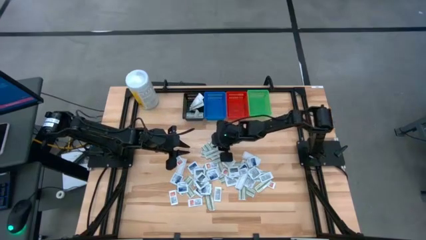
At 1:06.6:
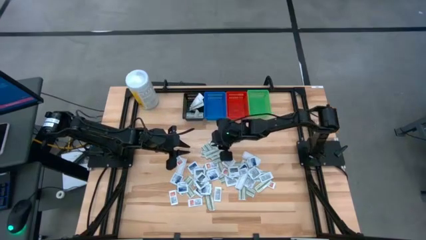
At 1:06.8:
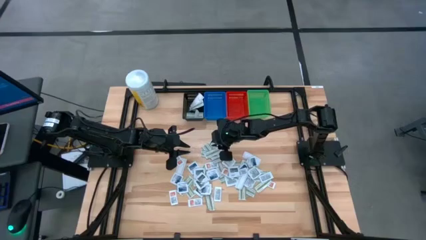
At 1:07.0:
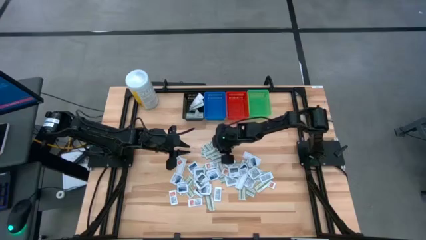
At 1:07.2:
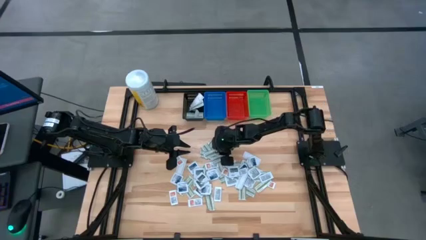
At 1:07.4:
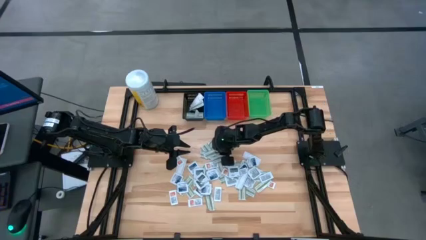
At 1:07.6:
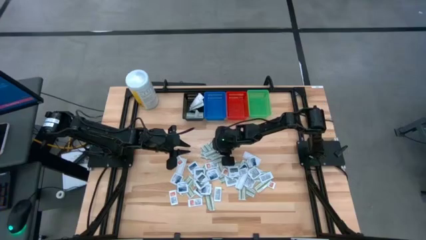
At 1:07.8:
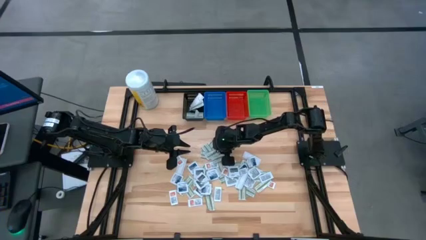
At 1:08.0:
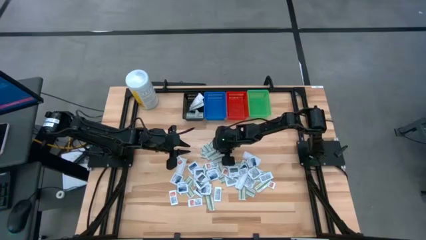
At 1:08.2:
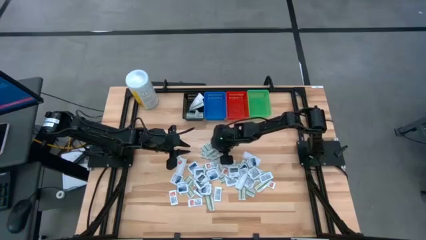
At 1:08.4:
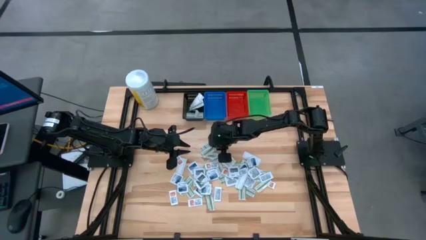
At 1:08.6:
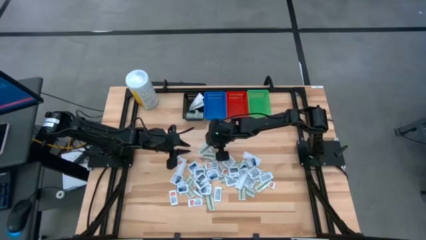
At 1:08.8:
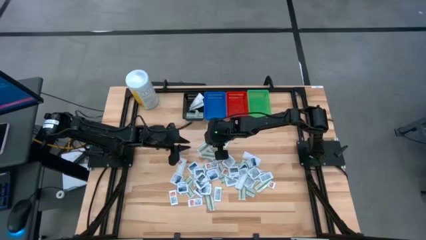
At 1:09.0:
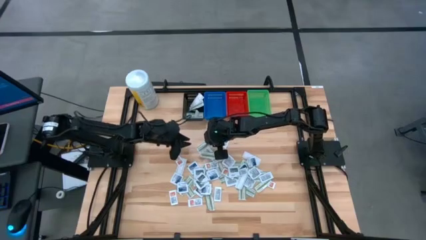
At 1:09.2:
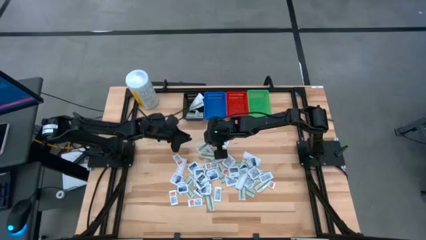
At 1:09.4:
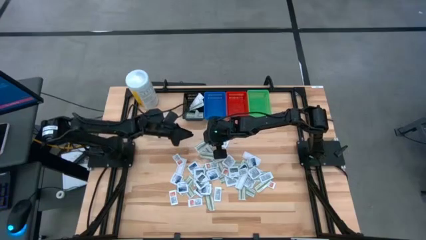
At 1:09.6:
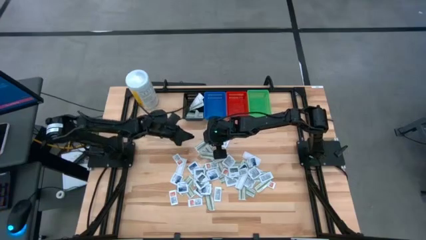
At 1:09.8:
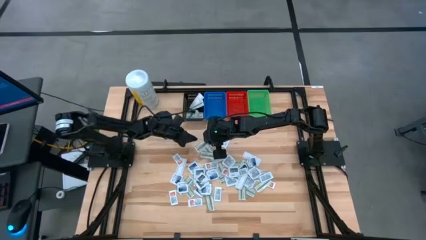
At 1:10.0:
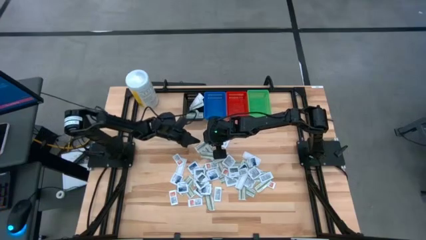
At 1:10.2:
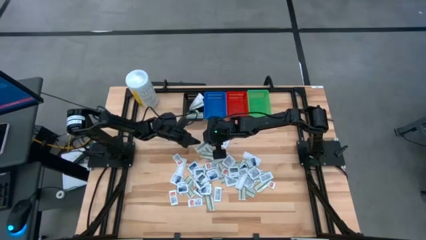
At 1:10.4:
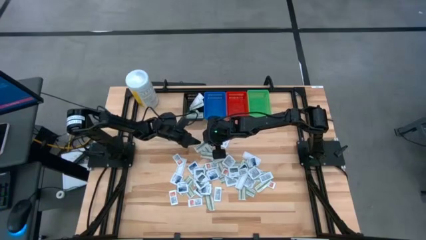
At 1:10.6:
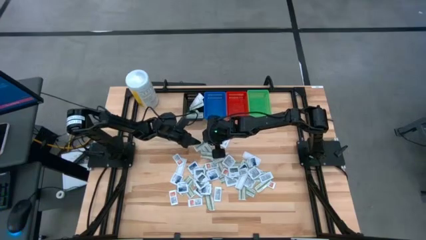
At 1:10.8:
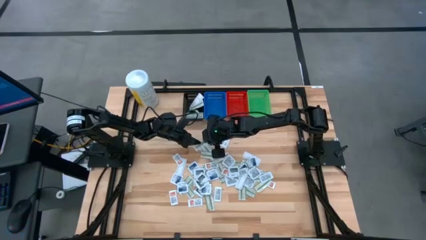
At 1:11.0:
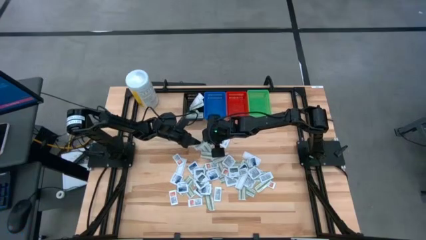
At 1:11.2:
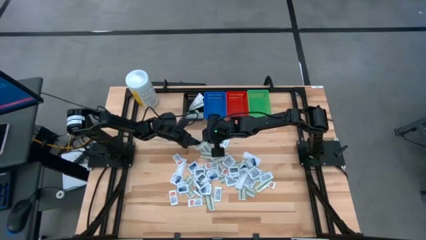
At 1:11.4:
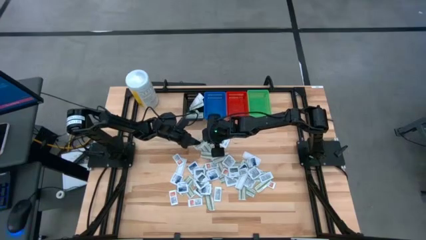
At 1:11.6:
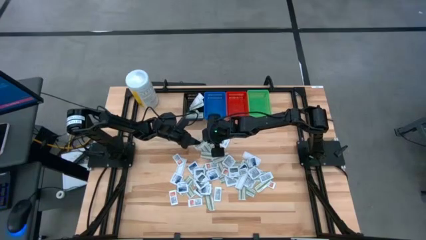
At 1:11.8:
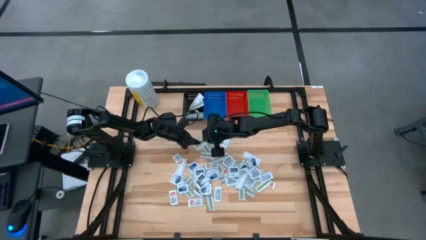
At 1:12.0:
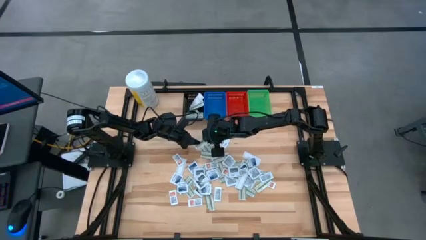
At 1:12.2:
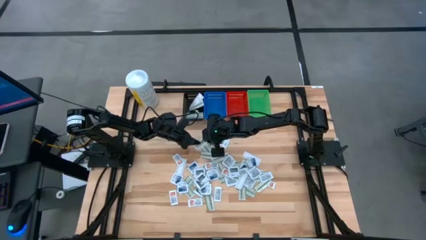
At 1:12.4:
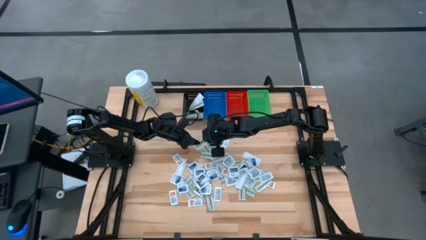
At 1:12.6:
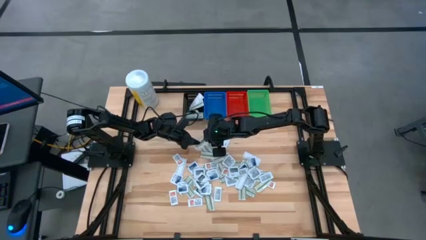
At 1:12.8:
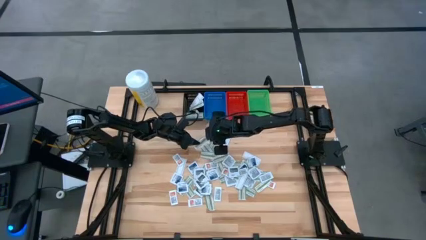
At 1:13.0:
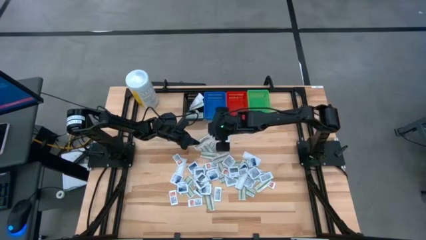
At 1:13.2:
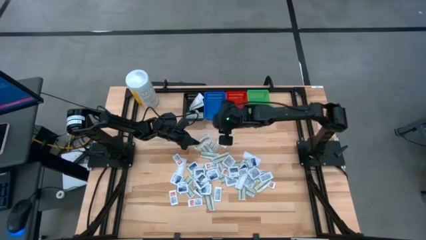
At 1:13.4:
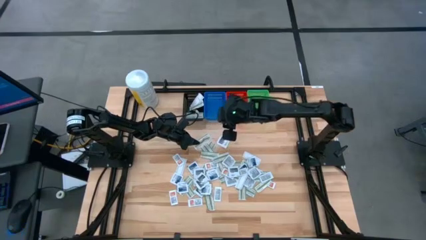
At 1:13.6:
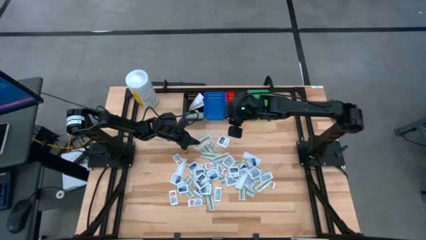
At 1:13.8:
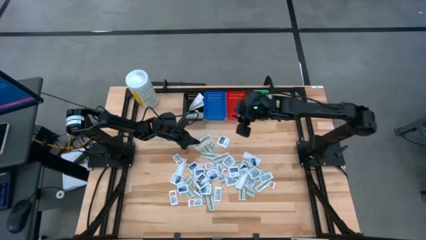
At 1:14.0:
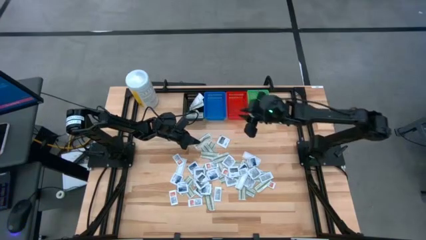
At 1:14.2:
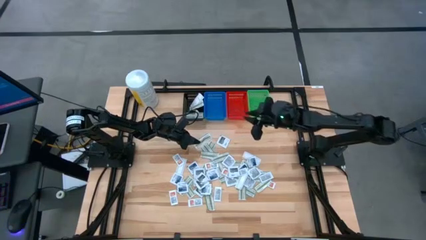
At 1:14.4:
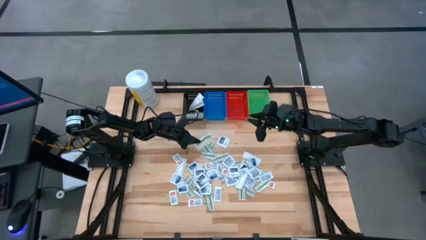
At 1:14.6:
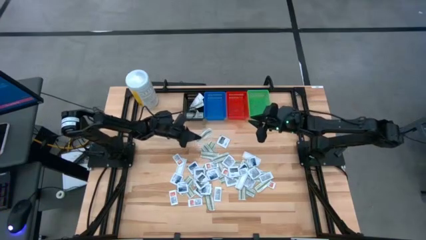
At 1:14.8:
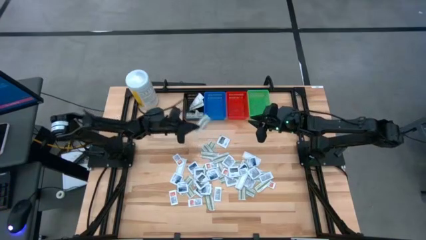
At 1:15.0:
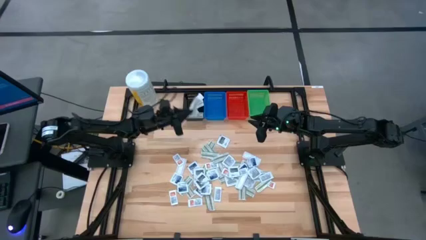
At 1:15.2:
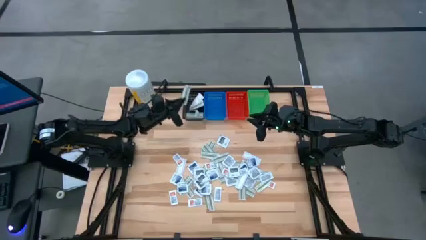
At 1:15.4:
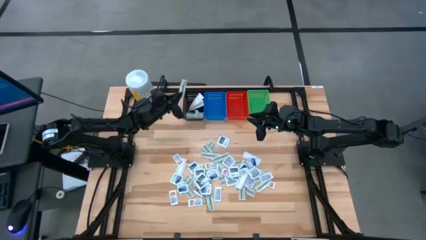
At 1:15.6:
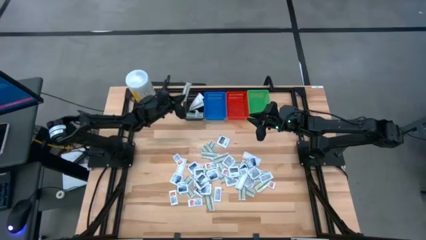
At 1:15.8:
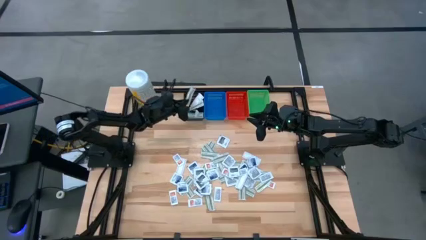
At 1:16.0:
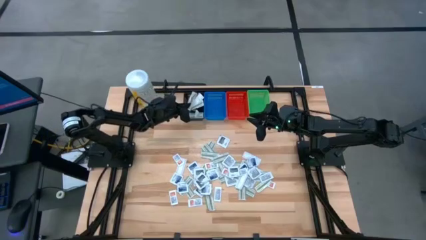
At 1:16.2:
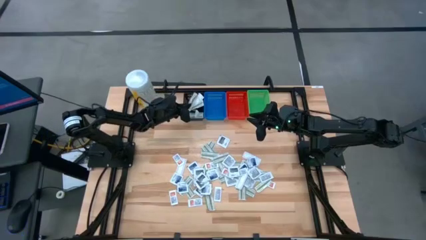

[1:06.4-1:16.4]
Task: Pick & Place First Aid Supplies
Put the green bandage pack in the black bin
